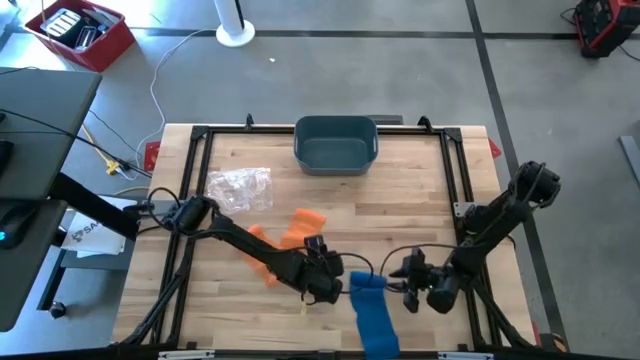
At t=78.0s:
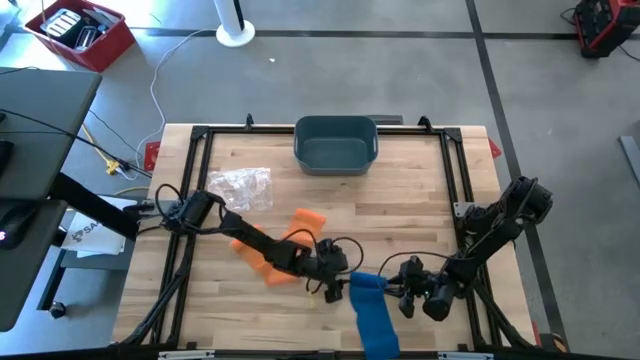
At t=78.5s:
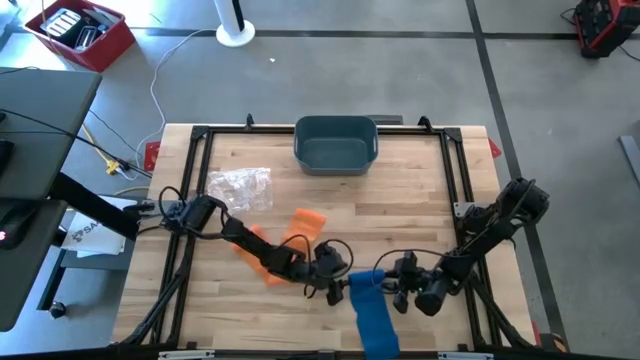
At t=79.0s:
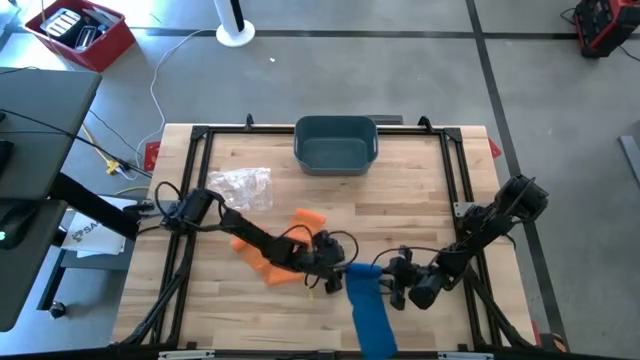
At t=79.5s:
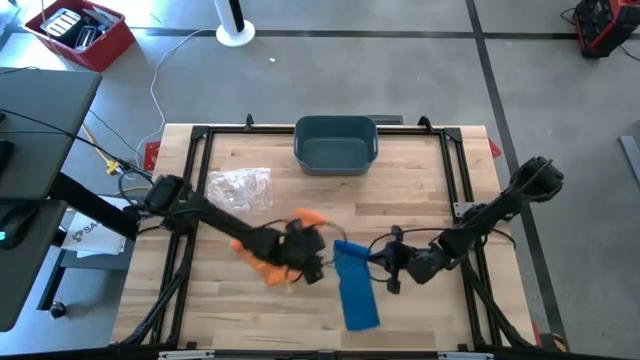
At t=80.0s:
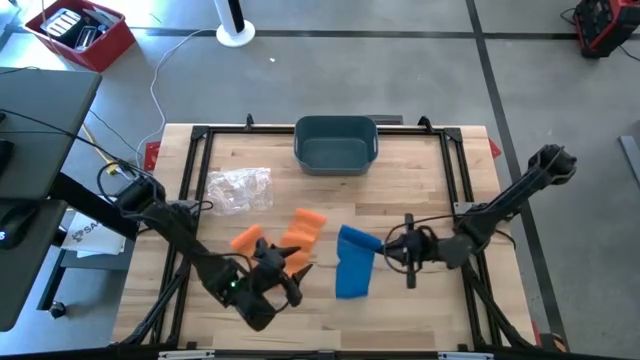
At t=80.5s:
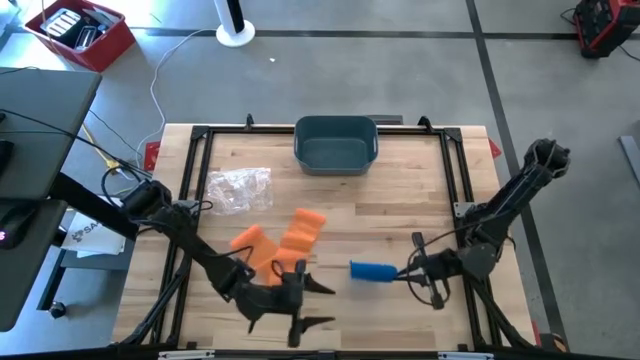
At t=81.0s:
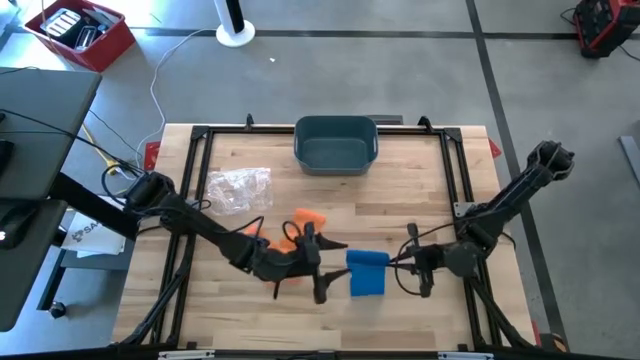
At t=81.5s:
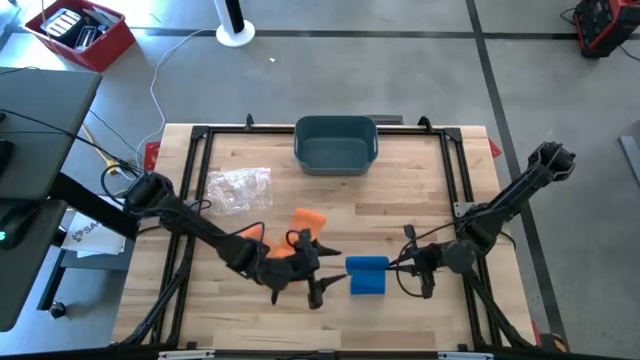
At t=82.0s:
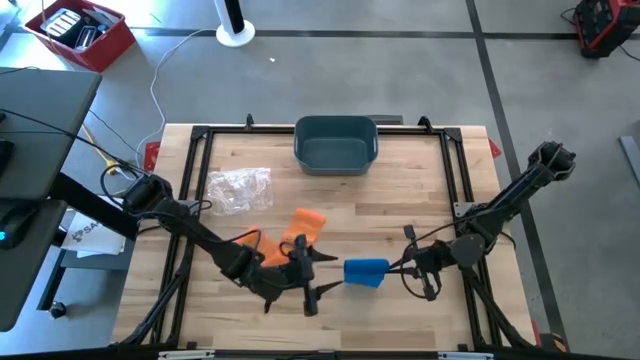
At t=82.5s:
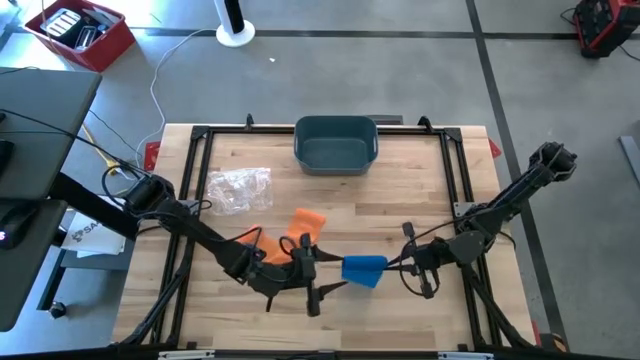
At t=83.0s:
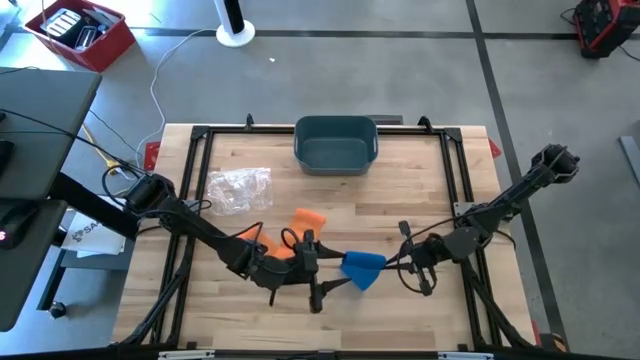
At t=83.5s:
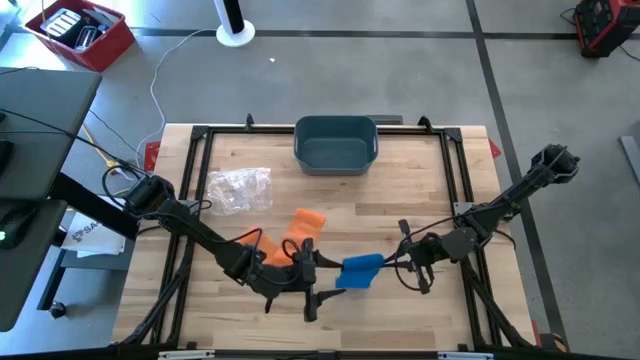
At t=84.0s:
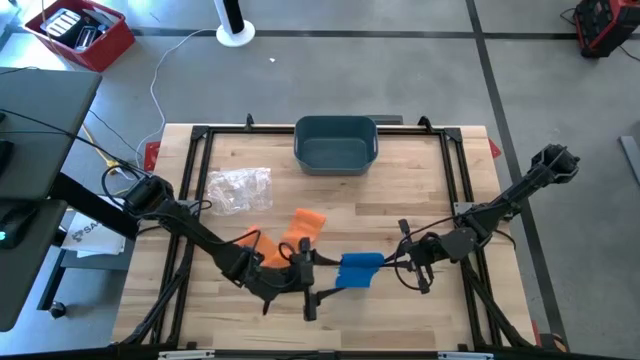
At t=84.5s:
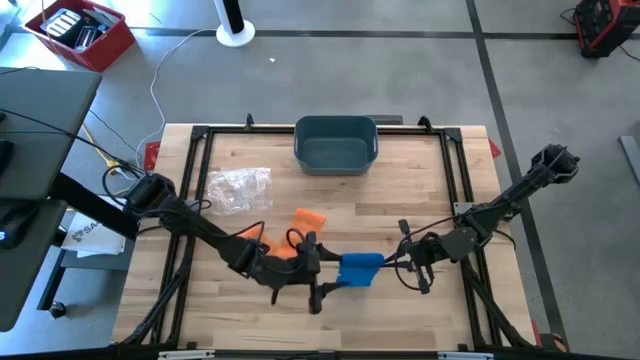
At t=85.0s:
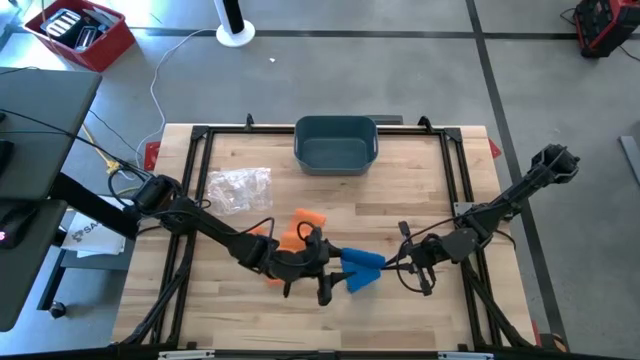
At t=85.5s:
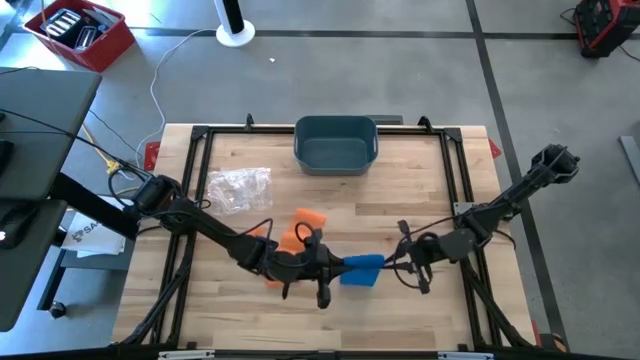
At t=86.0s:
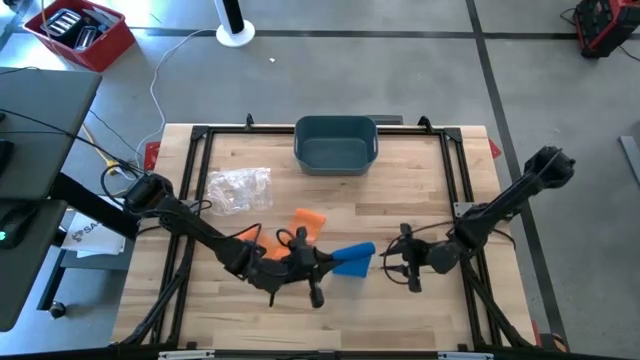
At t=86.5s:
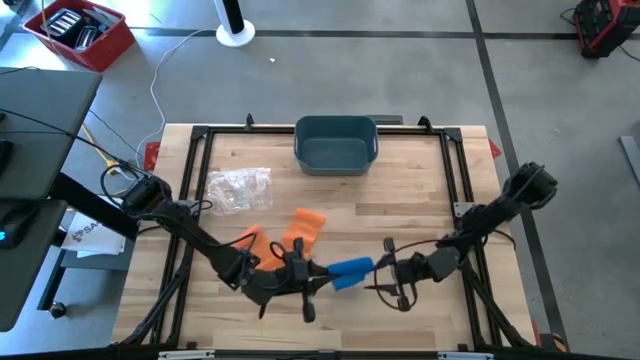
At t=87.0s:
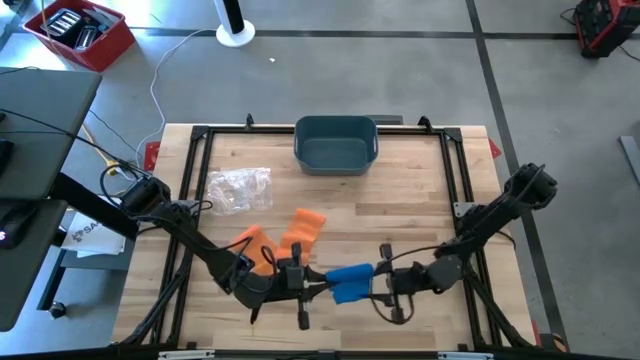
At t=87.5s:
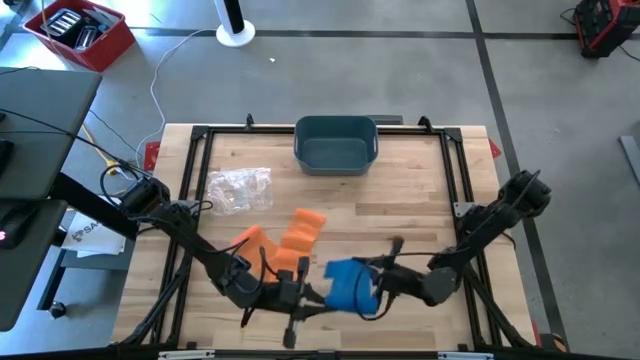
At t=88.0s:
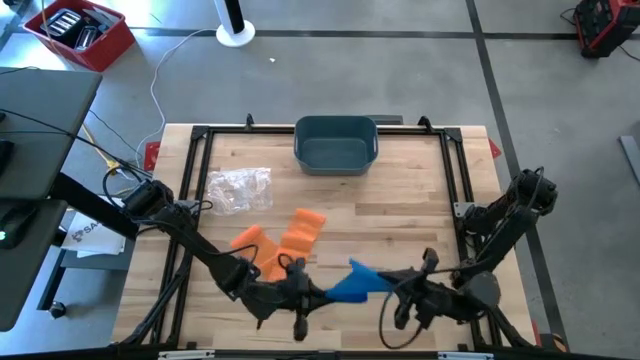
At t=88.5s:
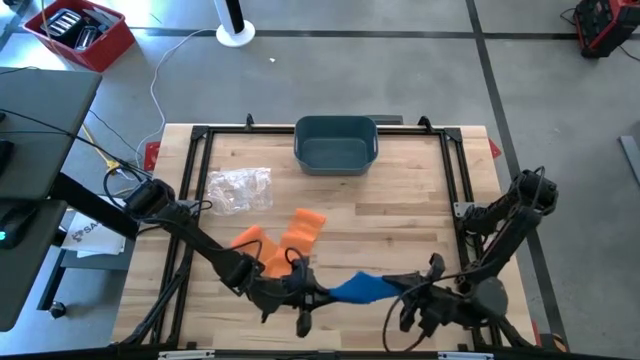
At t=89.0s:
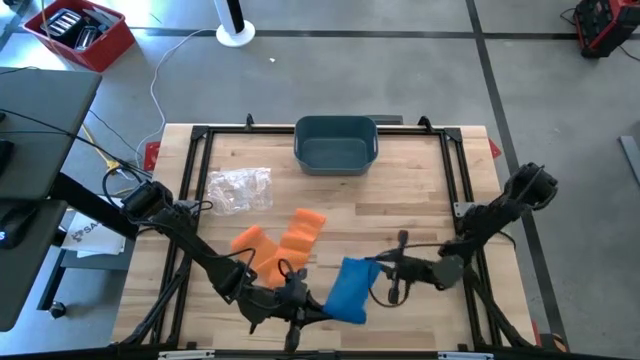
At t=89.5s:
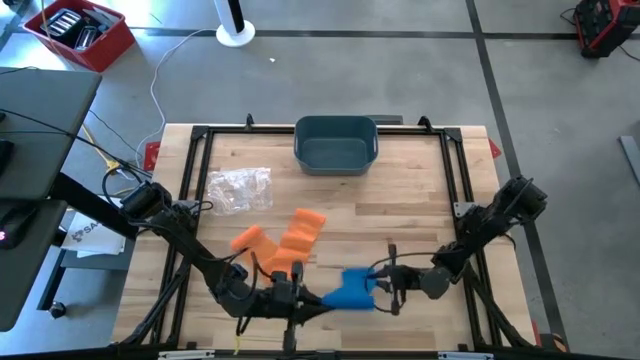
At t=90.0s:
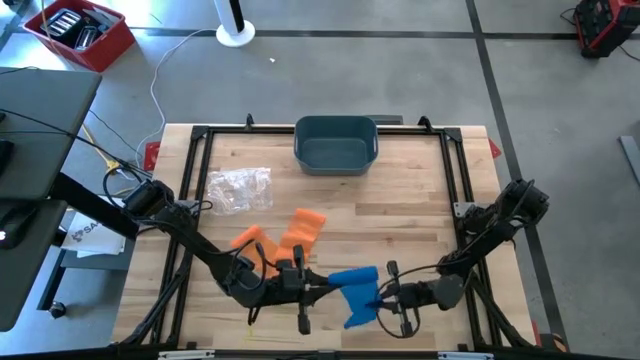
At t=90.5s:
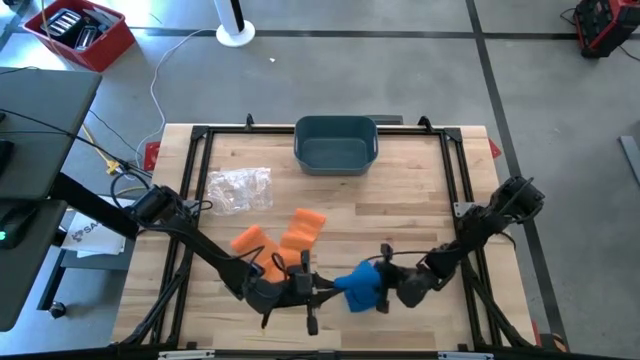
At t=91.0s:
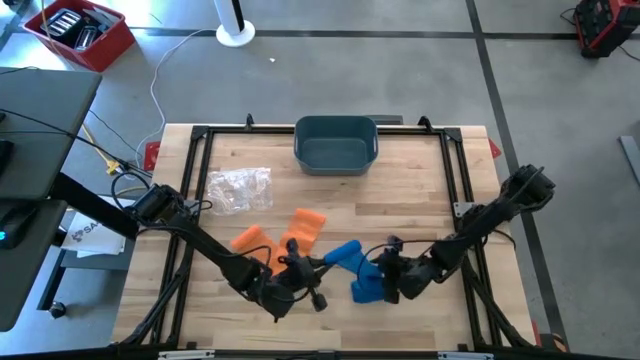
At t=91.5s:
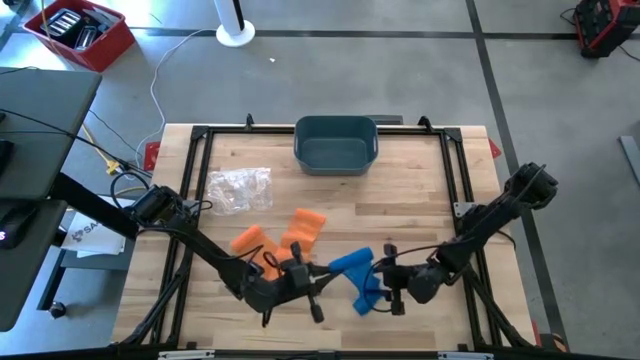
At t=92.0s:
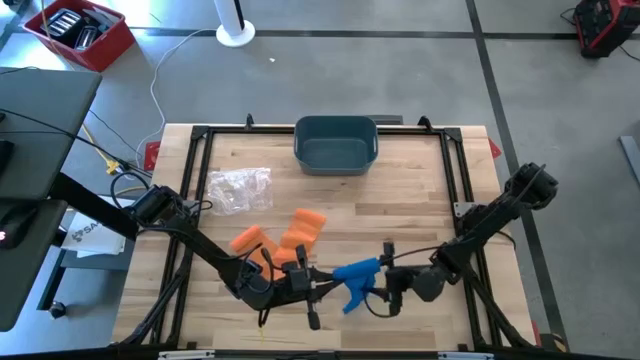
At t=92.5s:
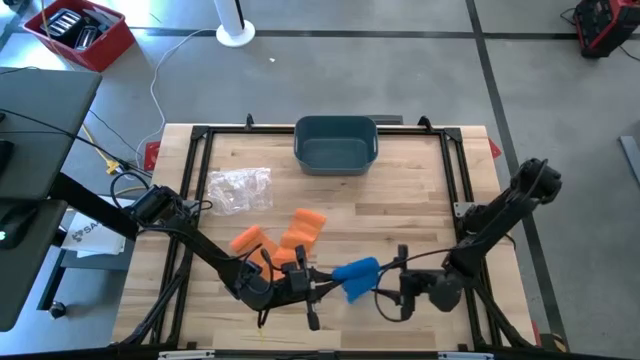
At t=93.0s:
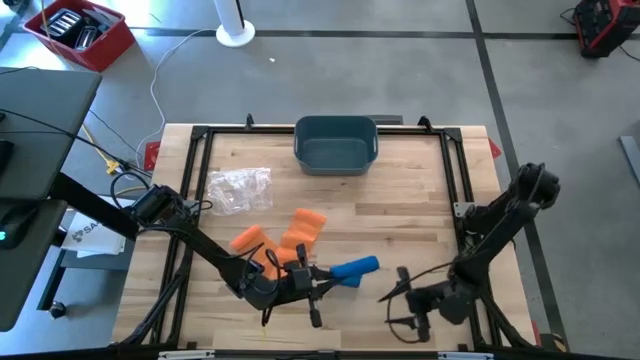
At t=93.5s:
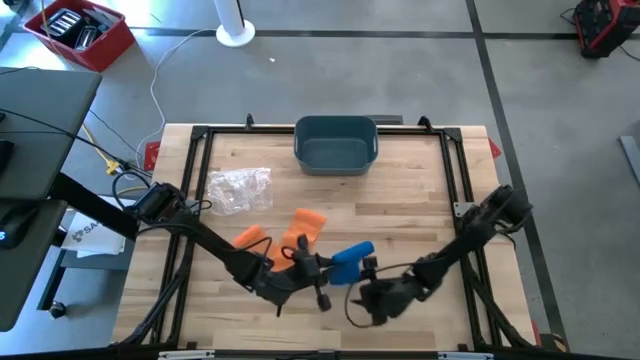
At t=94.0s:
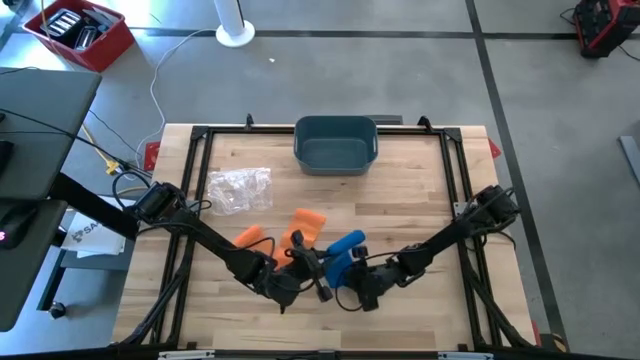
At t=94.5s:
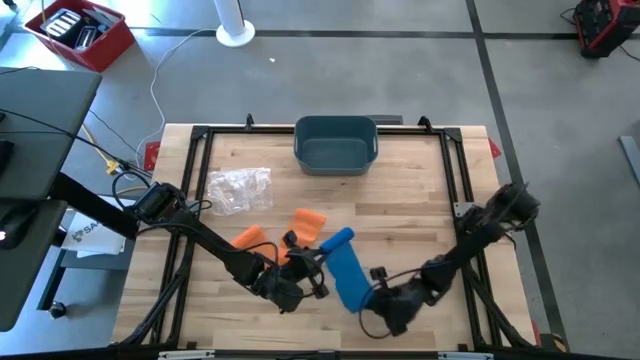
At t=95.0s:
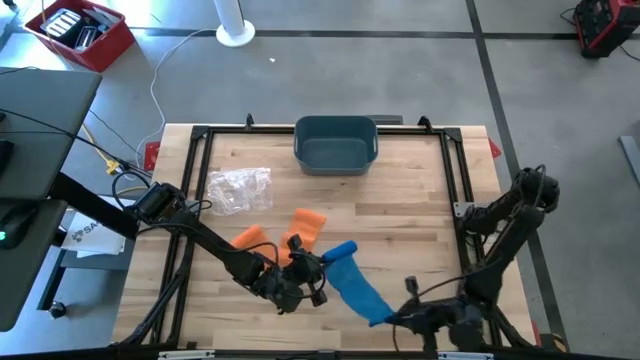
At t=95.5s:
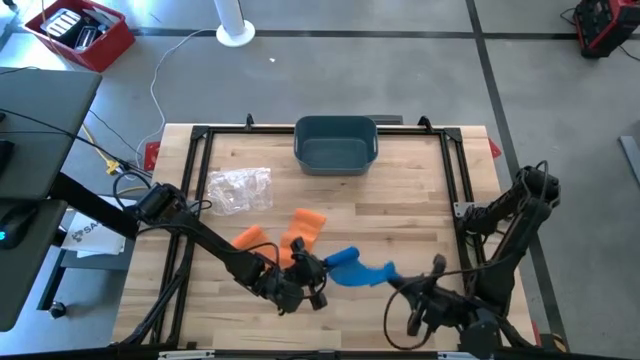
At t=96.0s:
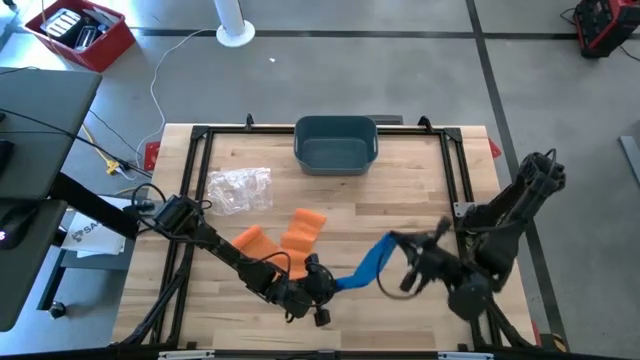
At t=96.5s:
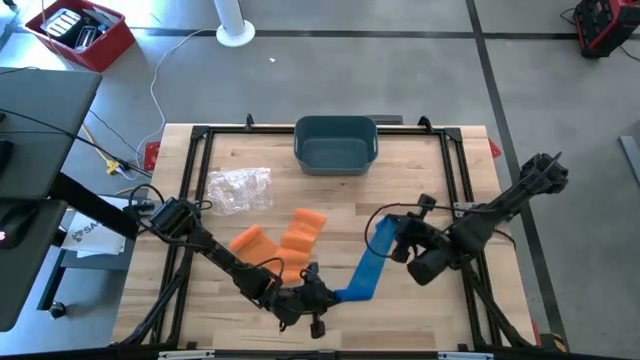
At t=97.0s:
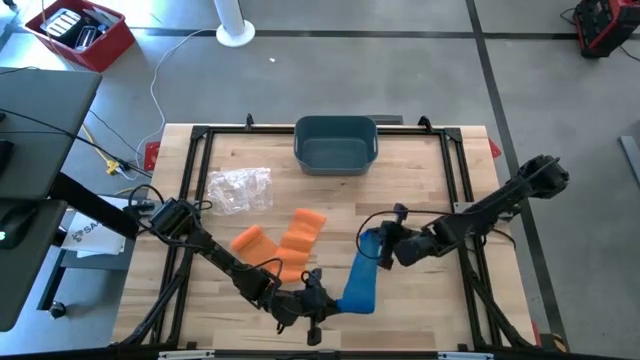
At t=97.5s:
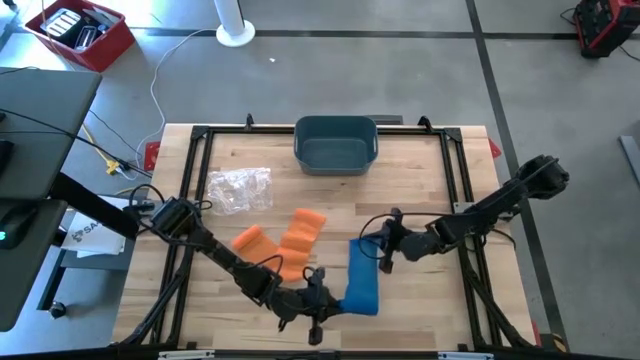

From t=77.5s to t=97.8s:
Task: Roll bandage
Roll the blue bandage
